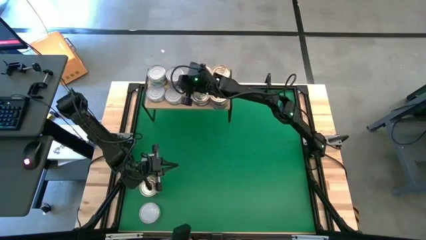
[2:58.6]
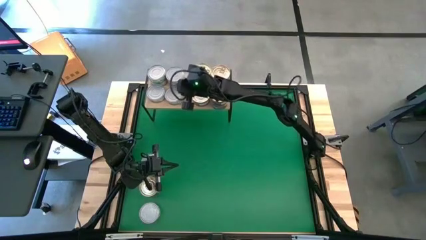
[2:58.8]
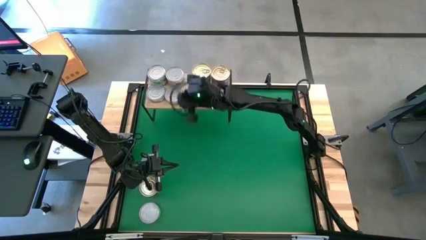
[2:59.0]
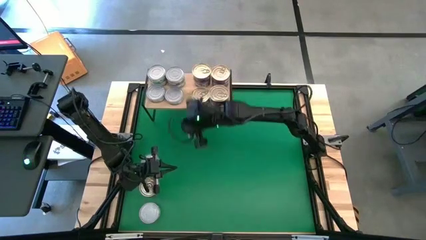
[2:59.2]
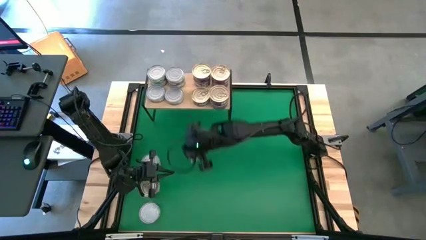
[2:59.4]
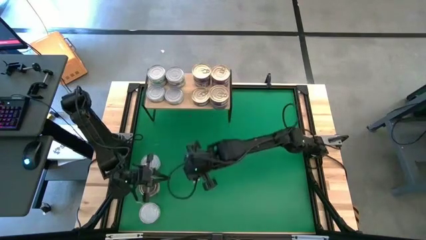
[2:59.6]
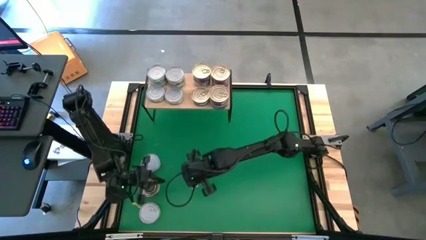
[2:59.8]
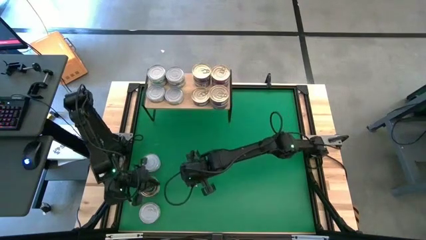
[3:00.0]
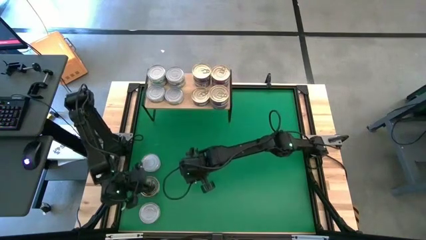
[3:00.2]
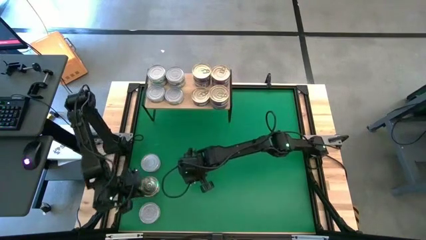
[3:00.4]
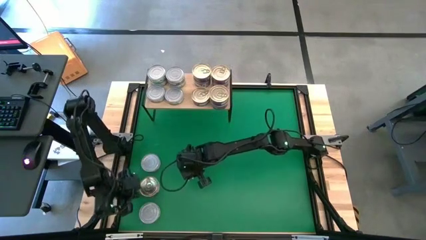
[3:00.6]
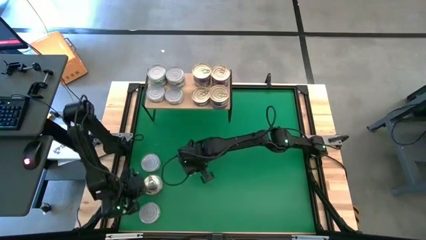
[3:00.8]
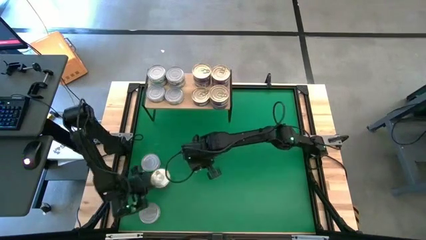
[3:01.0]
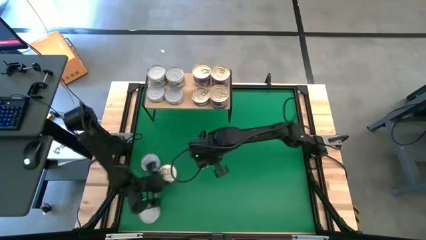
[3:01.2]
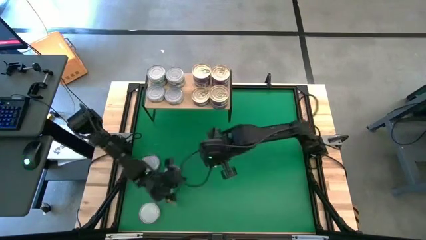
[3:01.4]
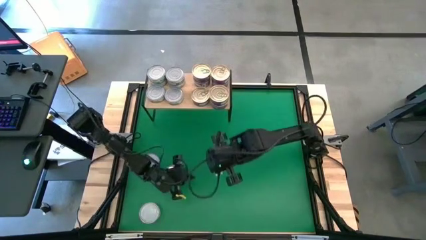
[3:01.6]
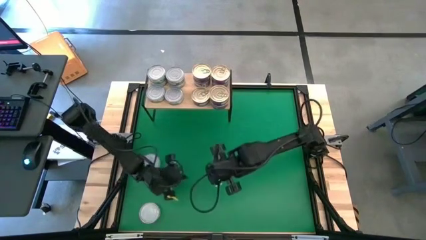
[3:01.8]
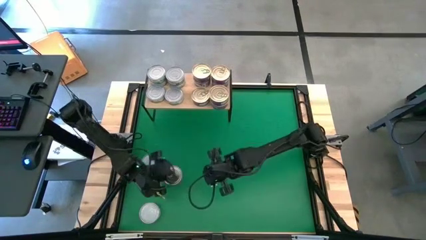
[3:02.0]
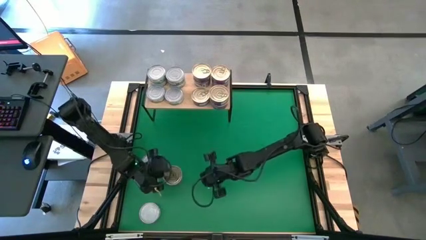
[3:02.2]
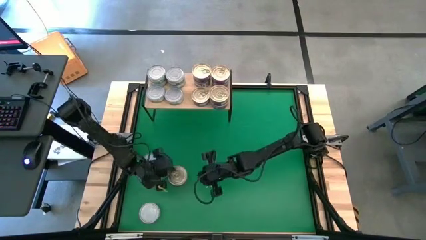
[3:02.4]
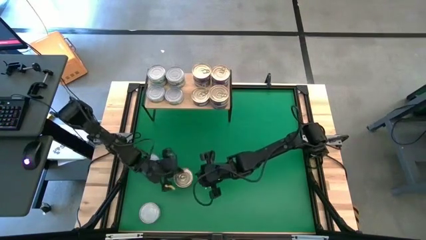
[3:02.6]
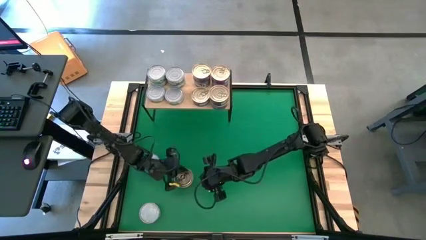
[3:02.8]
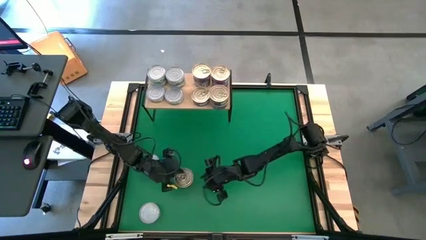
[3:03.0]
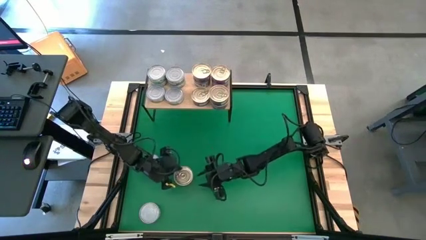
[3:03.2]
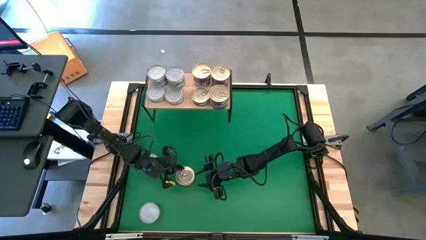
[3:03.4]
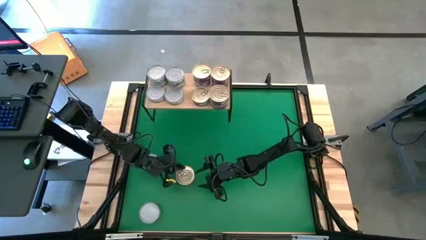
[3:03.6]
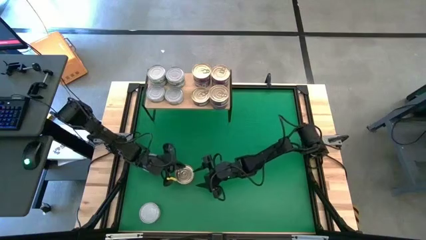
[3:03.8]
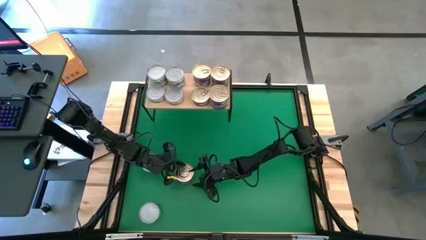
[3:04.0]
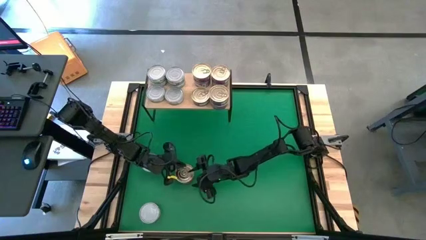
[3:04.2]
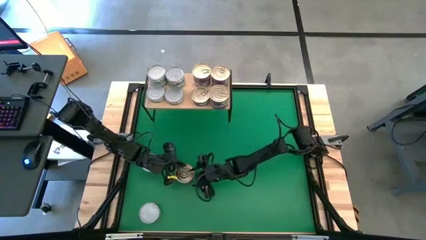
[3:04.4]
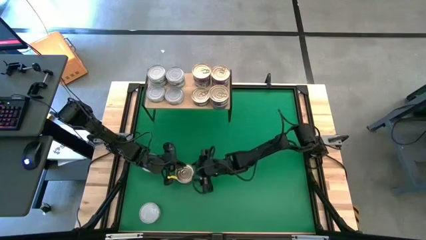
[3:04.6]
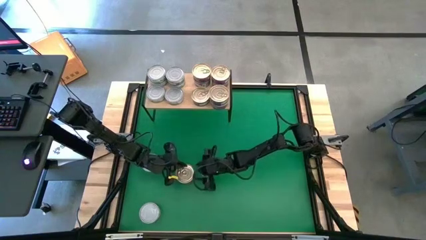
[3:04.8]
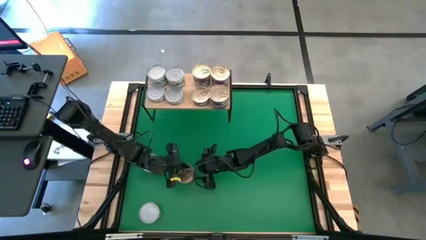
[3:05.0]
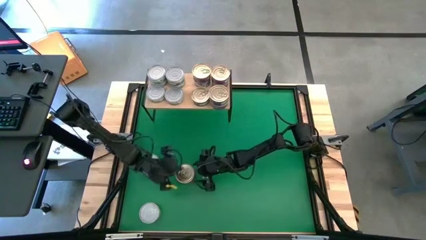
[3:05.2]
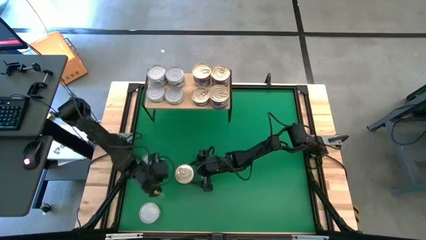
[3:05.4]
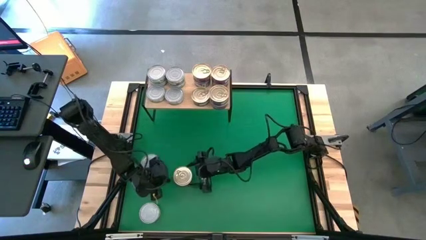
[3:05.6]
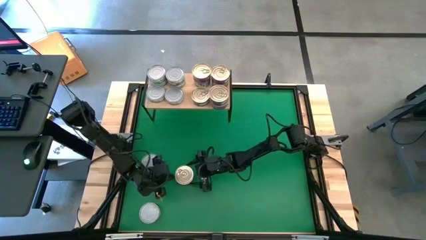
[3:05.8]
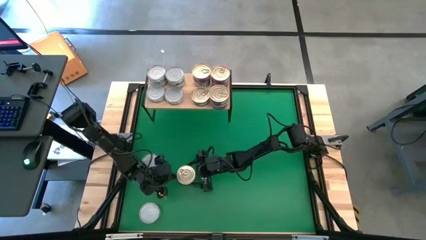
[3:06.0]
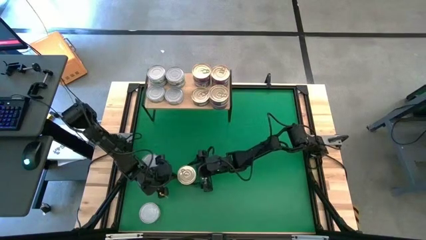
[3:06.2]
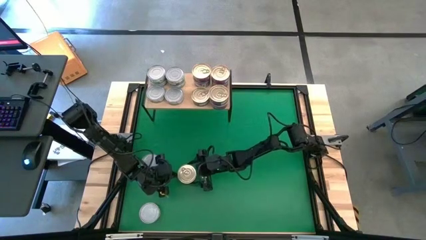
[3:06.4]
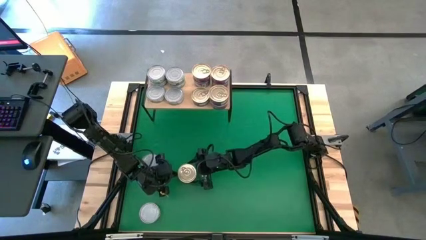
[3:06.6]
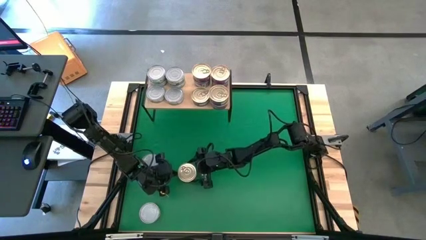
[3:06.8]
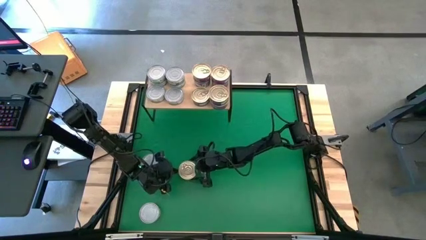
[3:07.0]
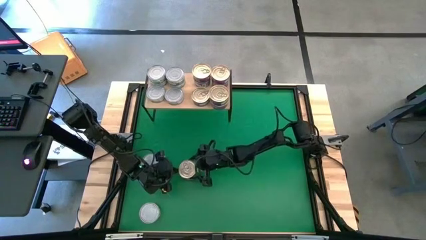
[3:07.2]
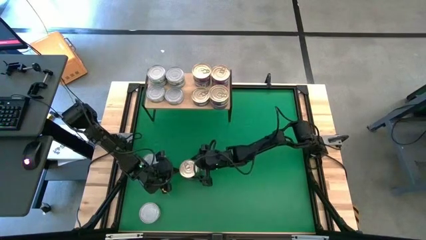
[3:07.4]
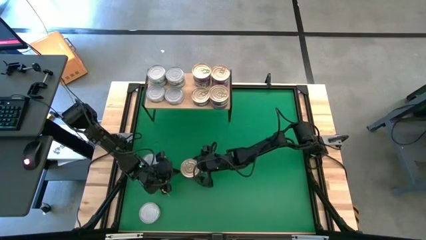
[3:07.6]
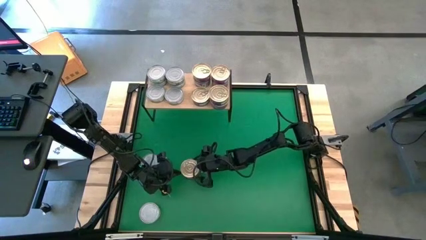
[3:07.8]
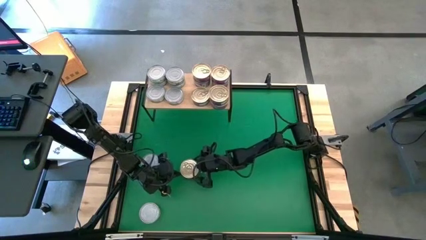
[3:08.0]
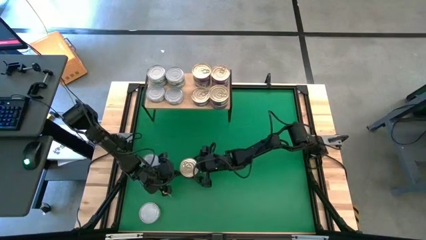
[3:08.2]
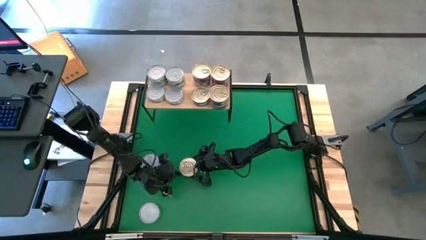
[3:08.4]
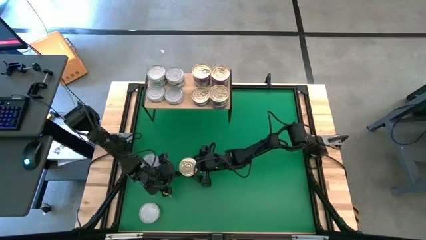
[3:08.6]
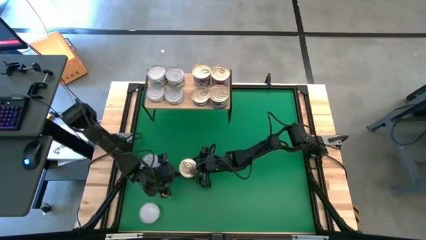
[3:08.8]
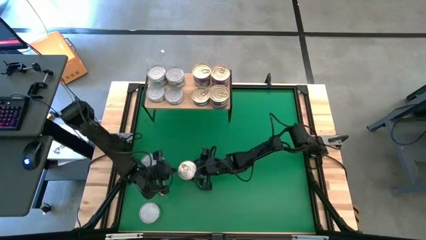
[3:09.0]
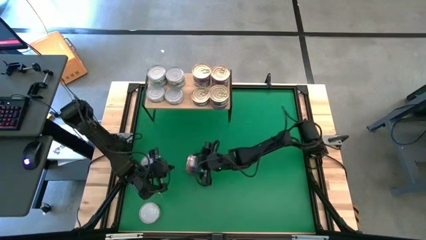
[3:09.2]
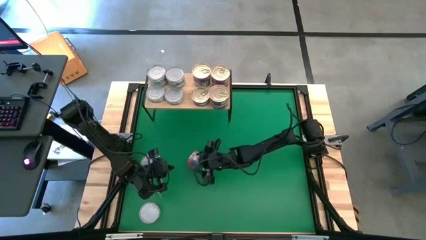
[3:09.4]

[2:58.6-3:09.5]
Task: Stack canned seafood by type on shelf
Stack the blue-pink tuna can on the other green tuna can on the shelf

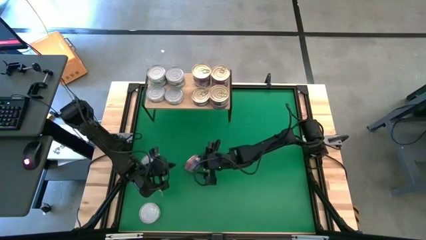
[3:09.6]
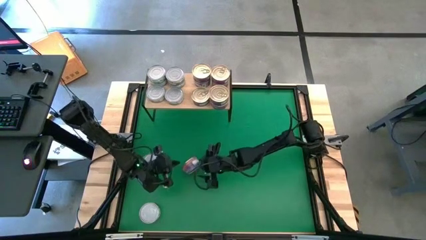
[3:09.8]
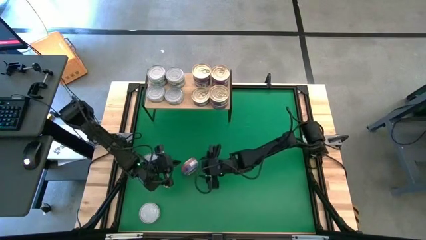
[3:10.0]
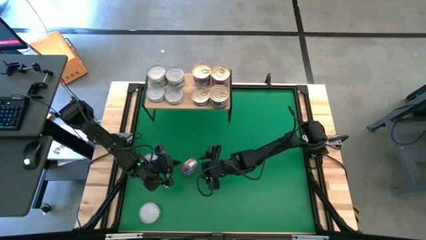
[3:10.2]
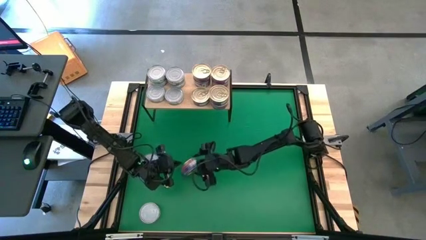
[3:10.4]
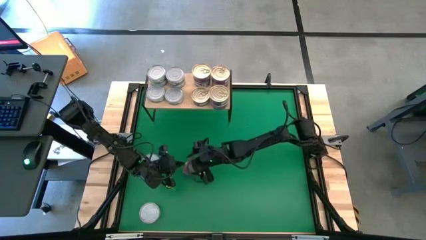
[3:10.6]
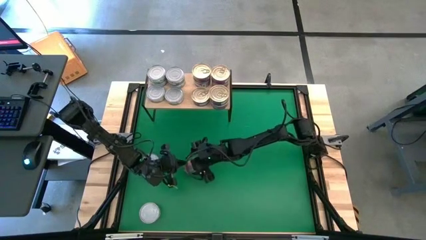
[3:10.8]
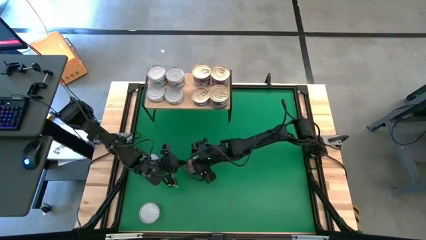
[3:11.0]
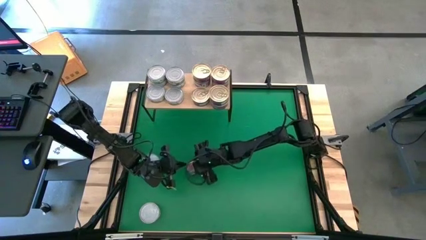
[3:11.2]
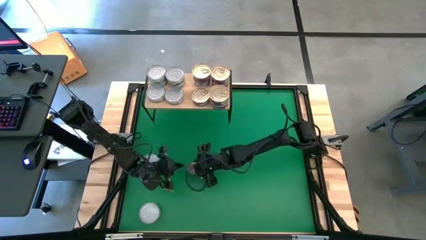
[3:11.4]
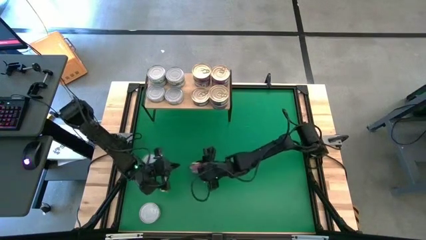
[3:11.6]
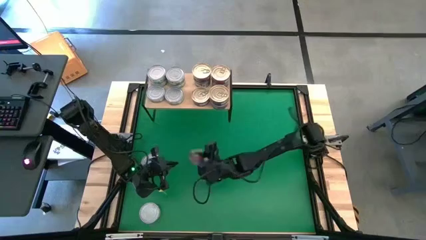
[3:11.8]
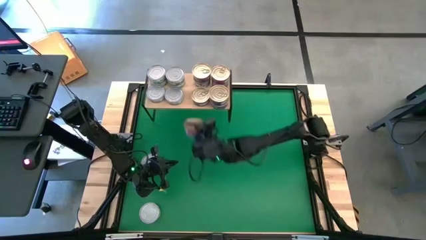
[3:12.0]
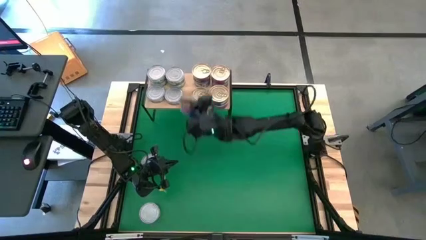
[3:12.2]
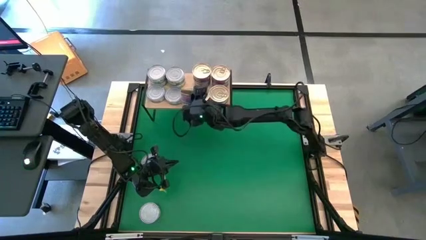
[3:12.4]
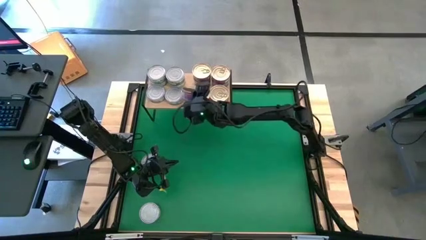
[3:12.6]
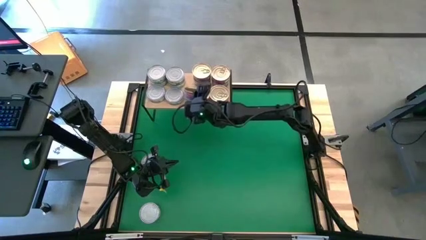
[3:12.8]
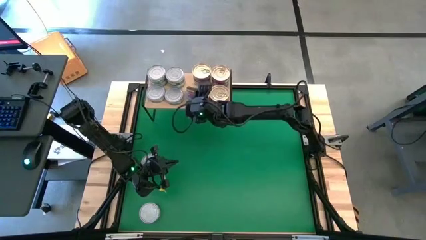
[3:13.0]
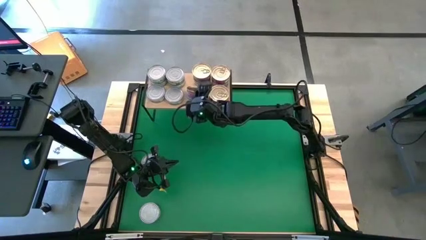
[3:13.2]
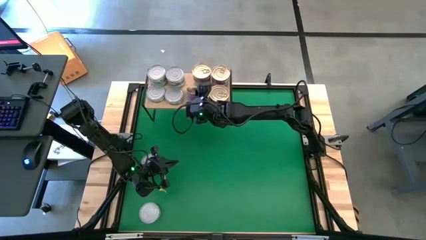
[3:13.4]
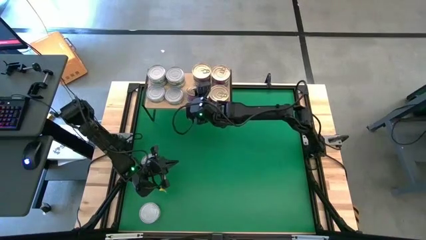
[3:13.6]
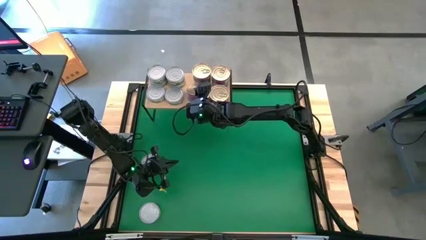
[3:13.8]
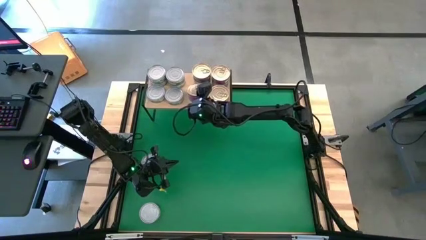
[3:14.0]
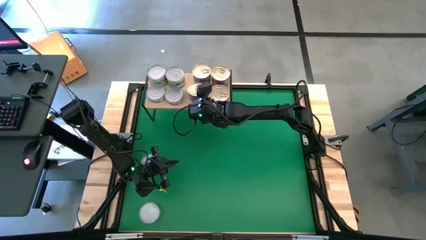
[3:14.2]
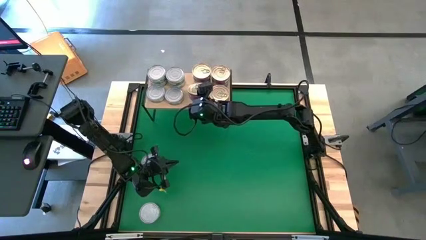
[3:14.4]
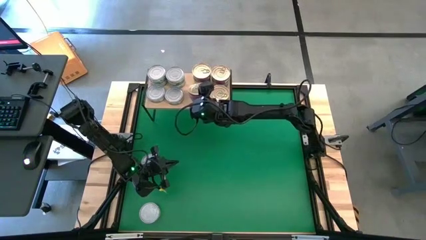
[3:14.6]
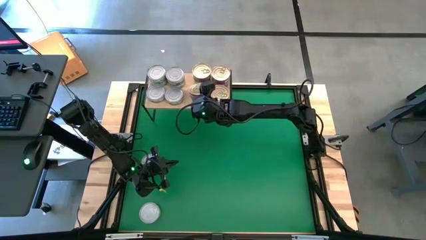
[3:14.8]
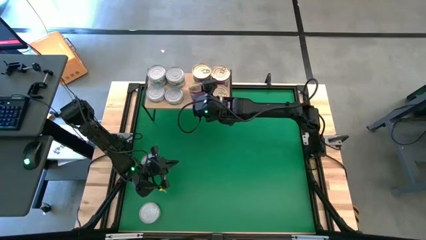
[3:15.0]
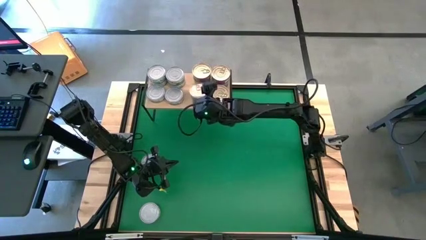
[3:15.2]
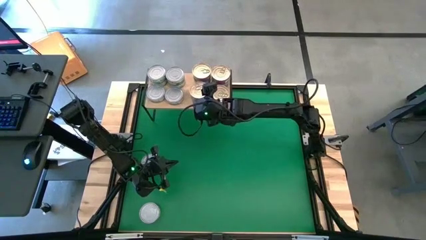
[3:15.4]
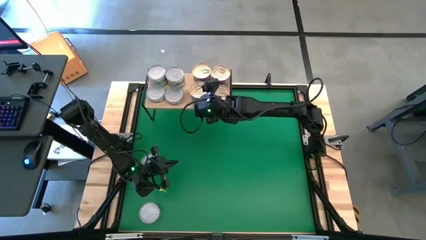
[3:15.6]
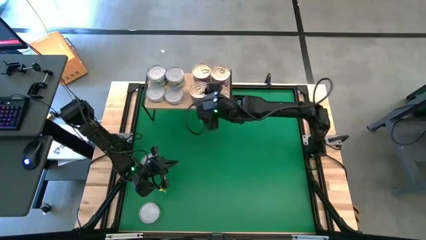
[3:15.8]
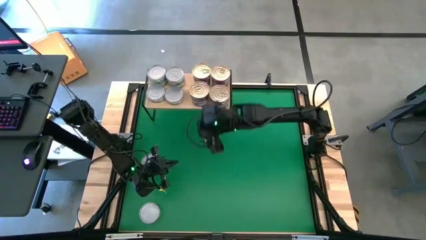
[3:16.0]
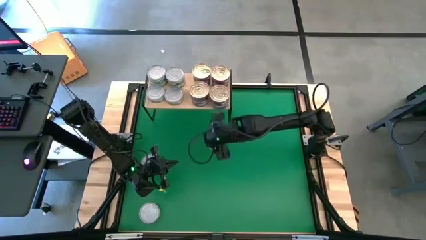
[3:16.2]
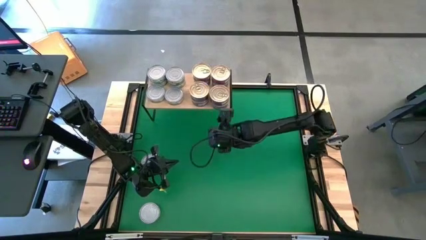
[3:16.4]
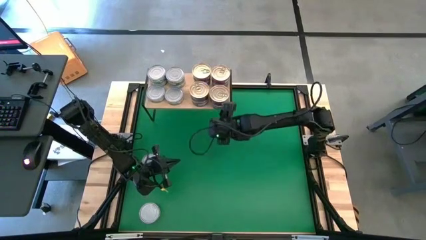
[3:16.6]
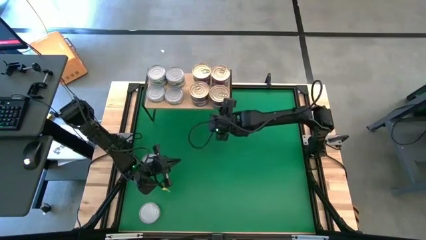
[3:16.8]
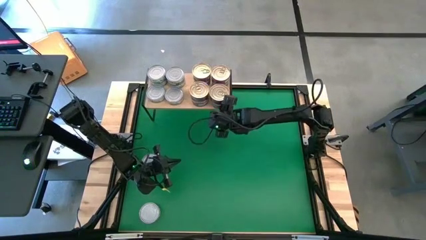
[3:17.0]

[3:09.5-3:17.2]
Stack the blue-pink tuna can on the other green tuna can on the shelf
